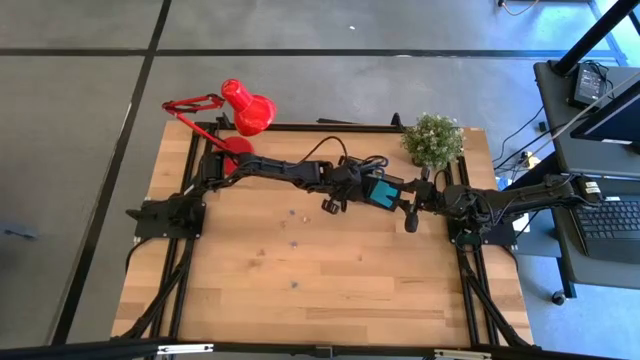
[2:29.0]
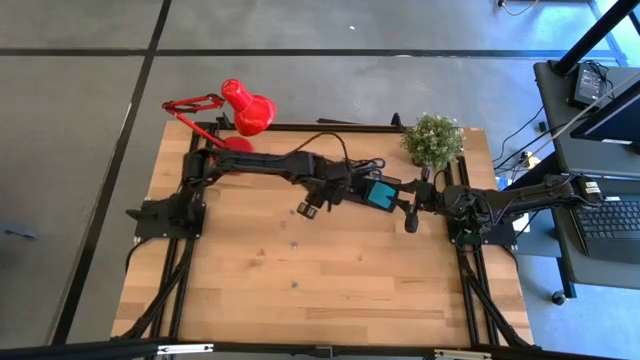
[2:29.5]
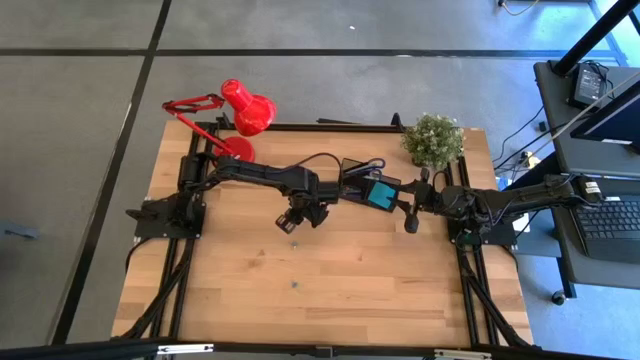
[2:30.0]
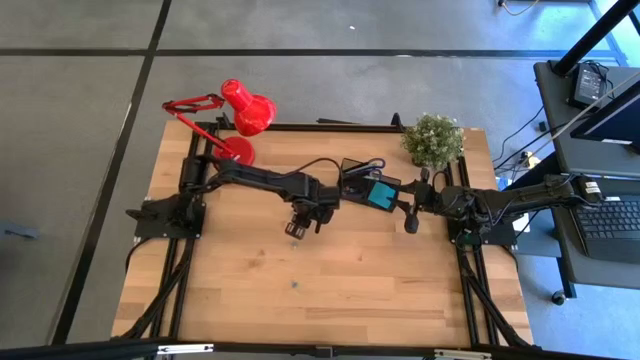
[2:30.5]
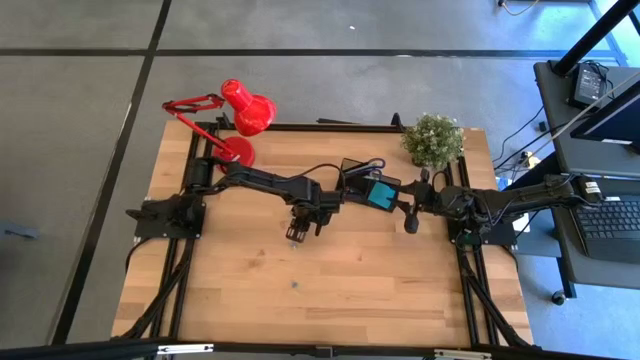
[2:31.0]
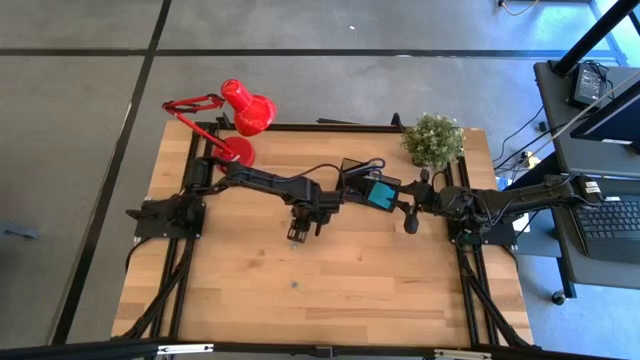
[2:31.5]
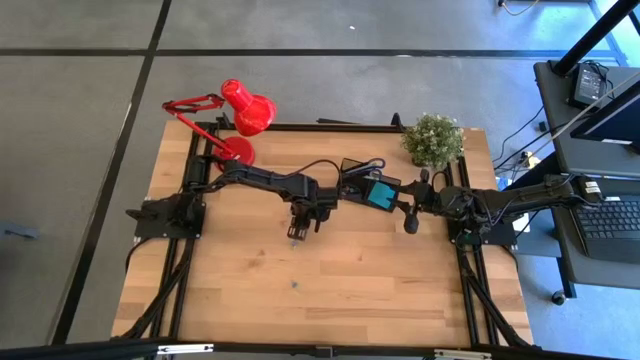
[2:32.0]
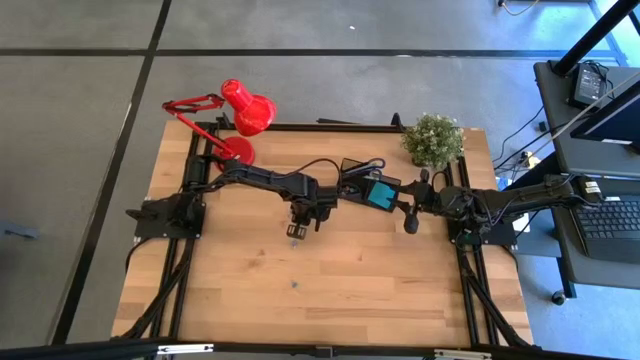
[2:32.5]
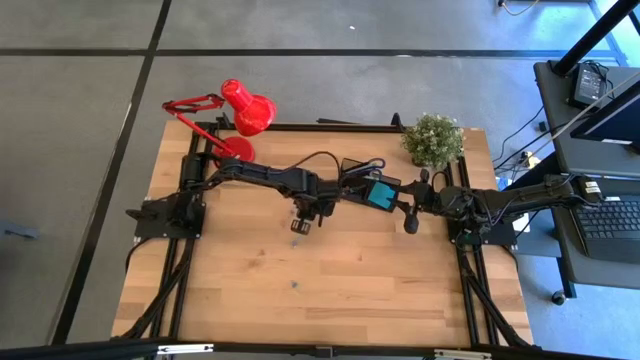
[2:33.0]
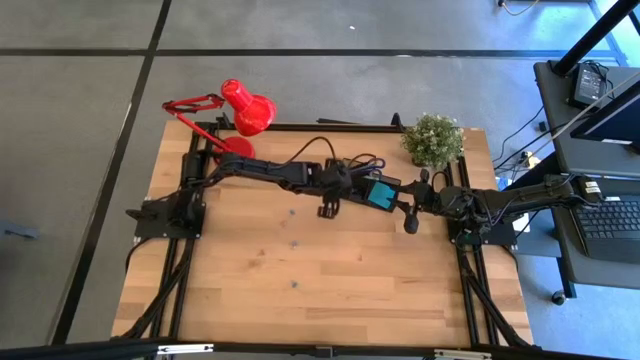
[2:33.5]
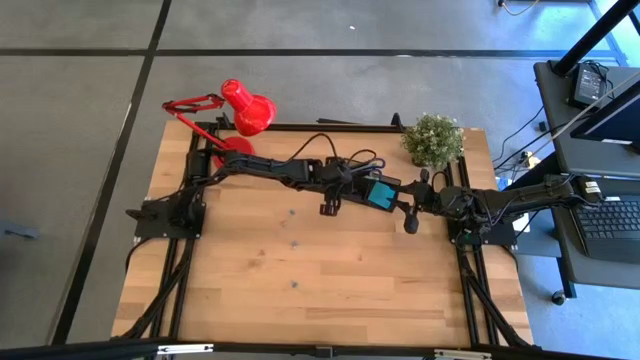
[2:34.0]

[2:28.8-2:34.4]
Task: Pick and place office supplies into organizer
Put the yellow binder clip into the black desk organizer

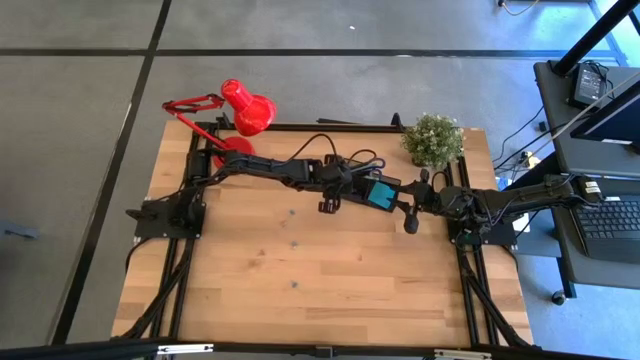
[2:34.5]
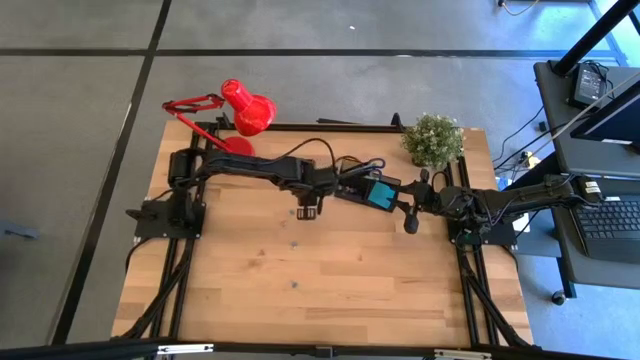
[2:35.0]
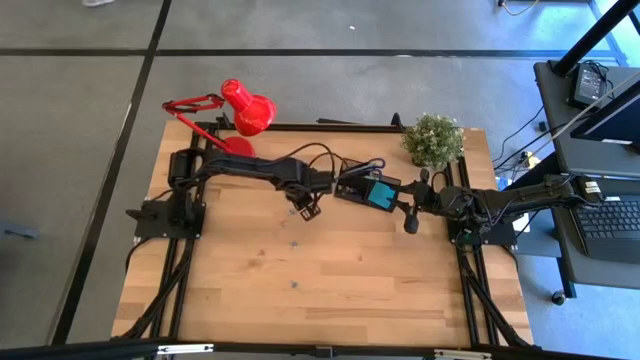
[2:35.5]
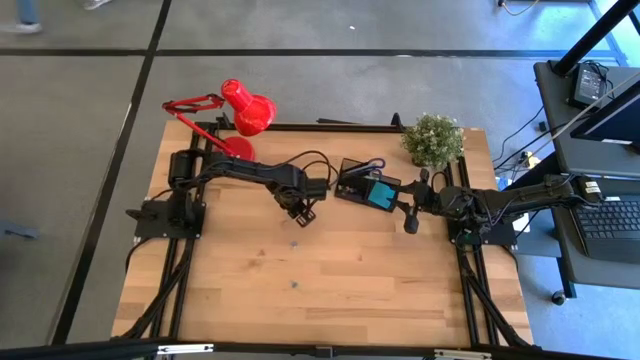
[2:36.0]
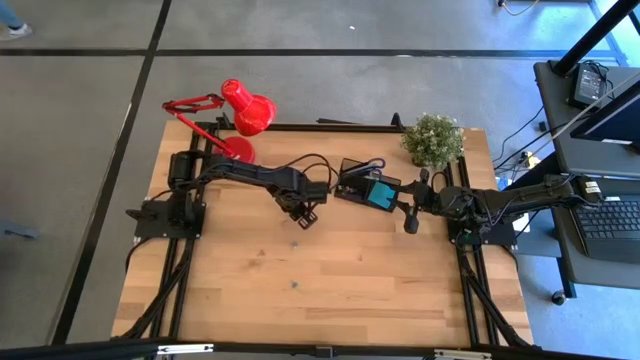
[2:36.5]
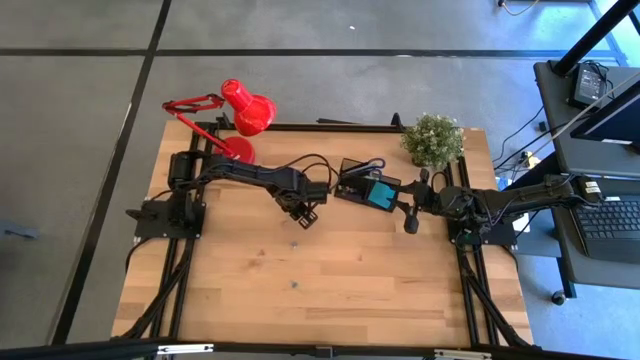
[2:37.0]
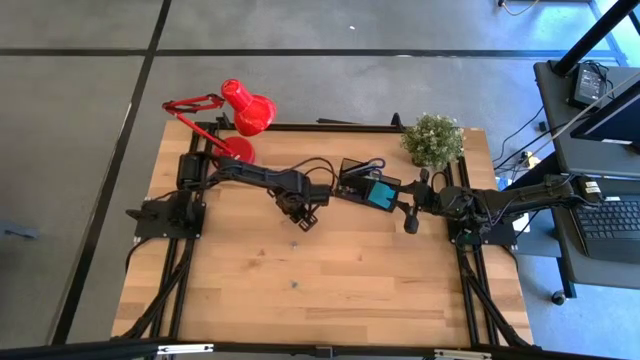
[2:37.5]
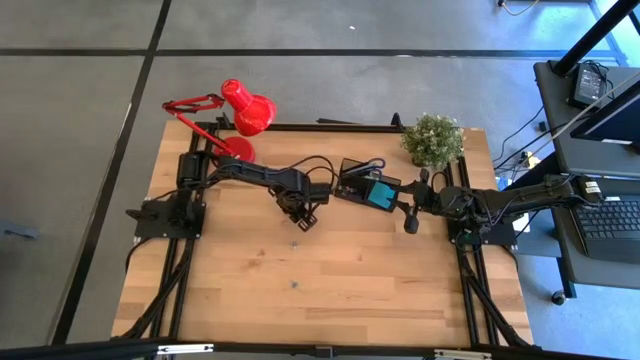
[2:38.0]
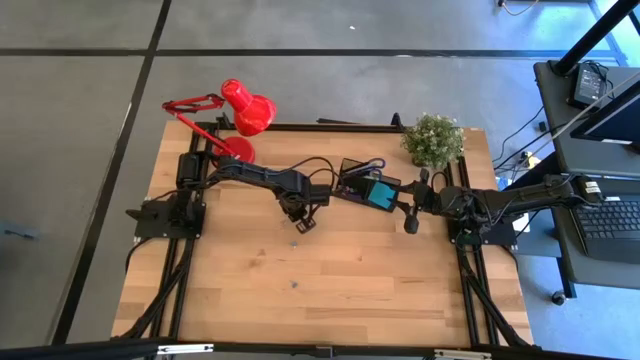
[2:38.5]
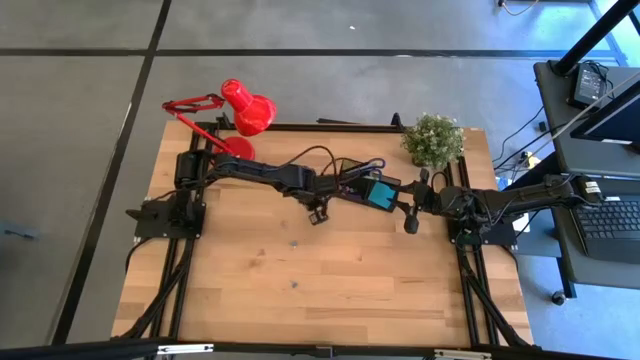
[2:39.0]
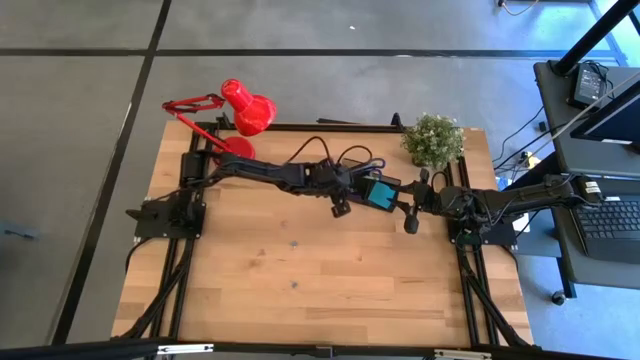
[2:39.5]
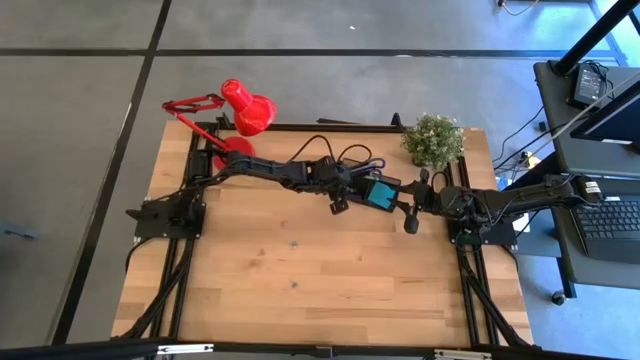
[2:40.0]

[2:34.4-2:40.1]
Put the blue binder clip into the black desk organizer

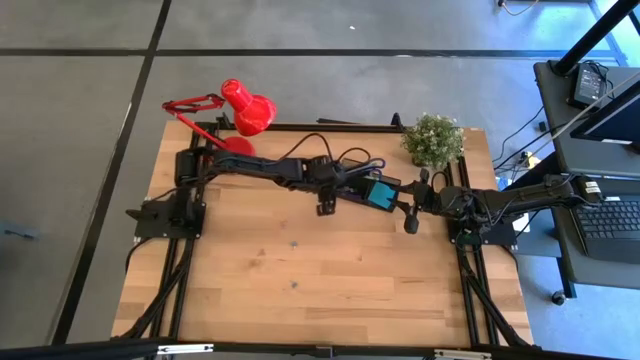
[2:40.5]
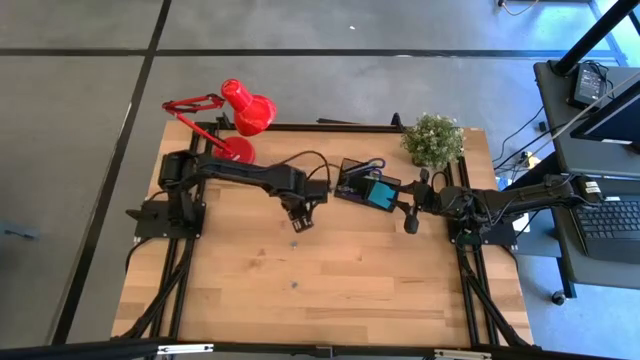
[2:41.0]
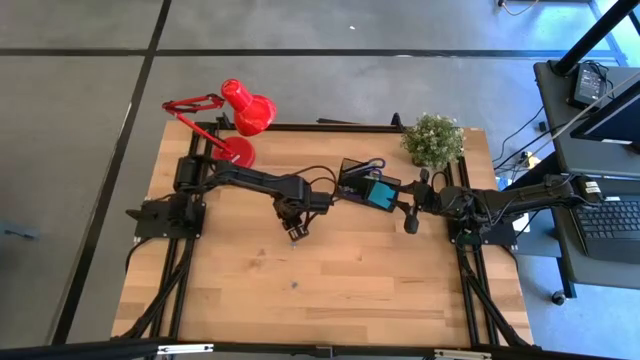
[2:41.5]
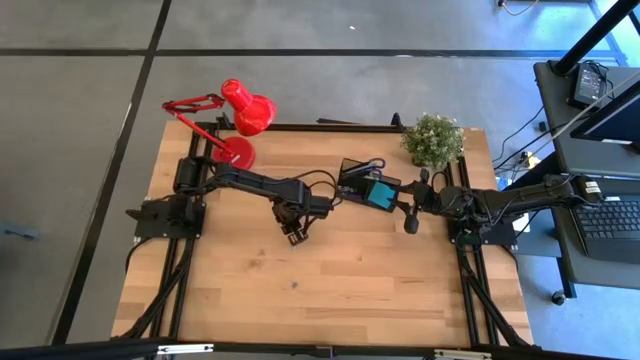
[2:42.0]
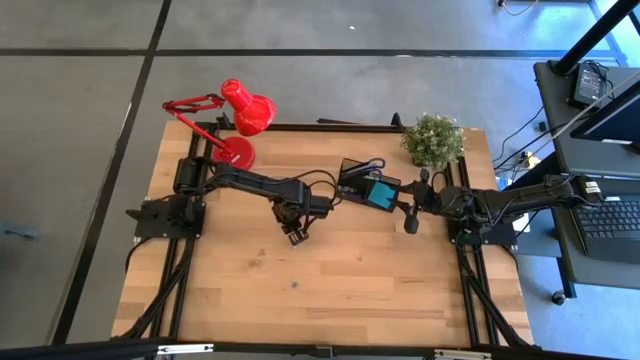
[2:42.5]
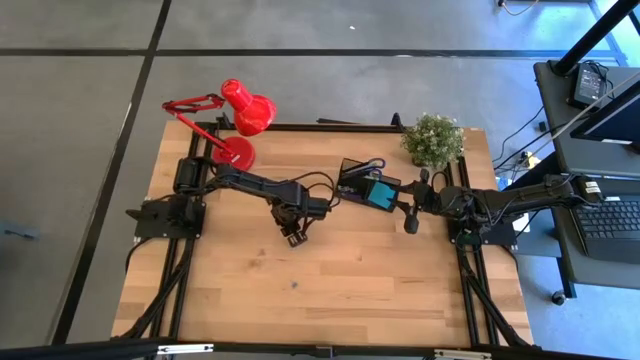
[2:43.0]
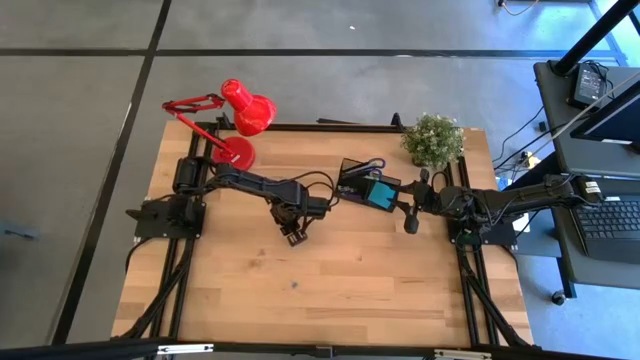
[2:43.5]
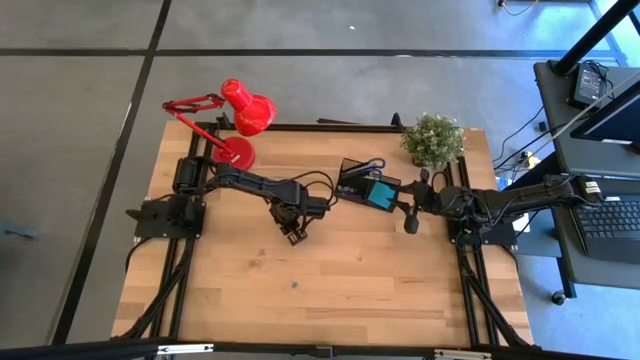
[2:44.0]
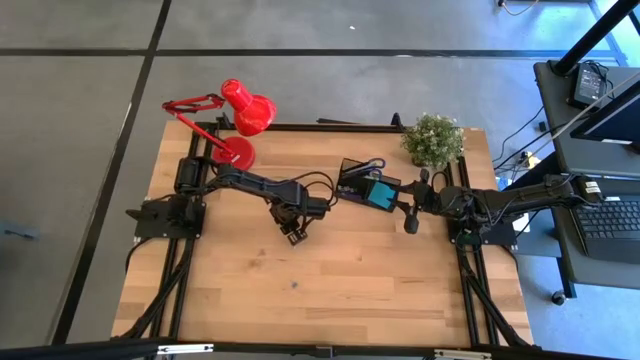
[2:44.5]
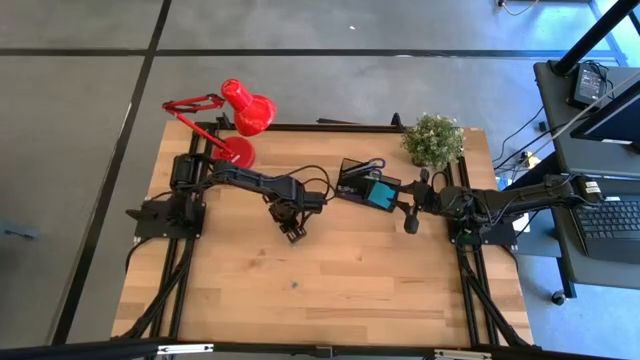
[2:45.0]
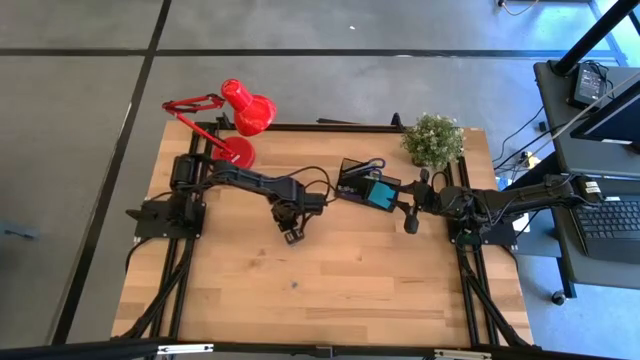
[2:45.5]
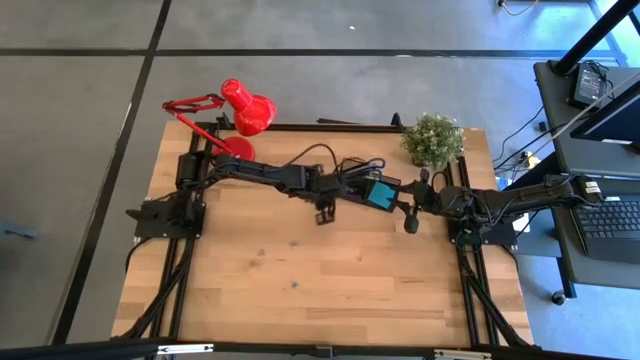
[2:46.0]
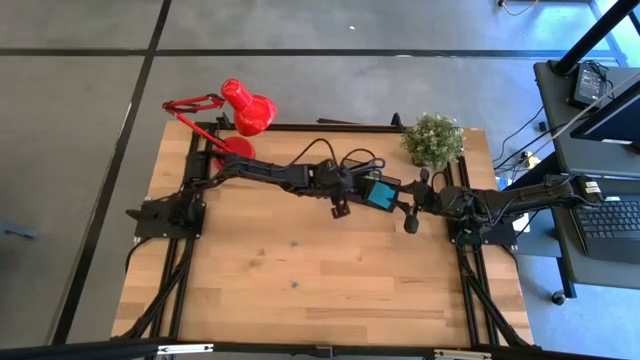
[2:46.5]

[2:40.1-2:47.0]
Put the pink binder clip into the black desk organizer

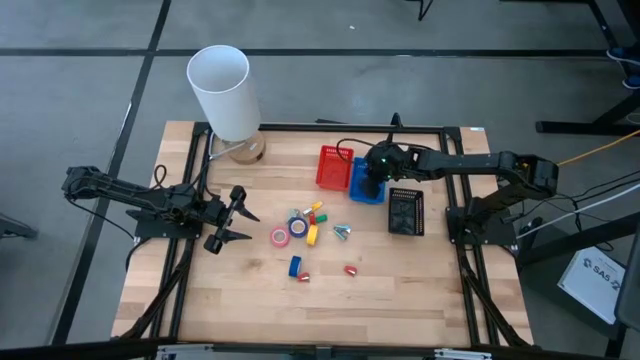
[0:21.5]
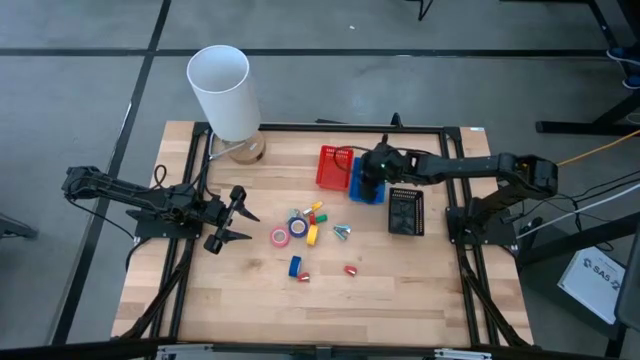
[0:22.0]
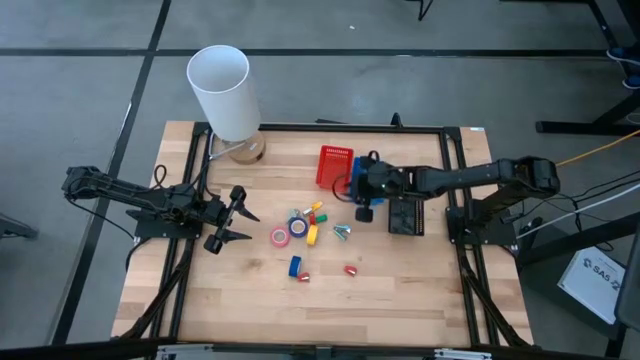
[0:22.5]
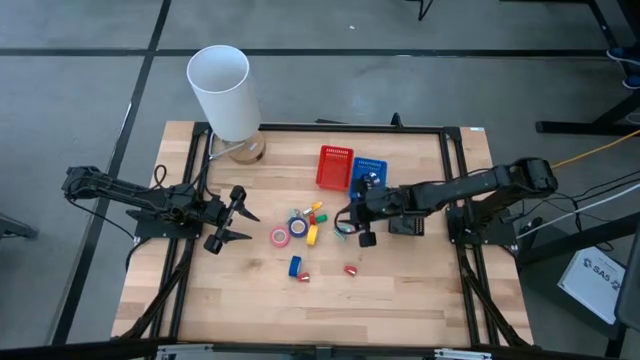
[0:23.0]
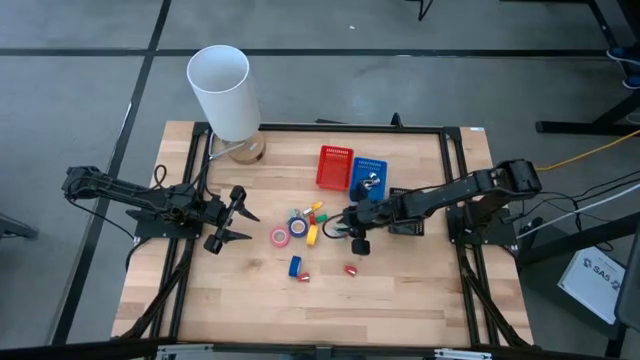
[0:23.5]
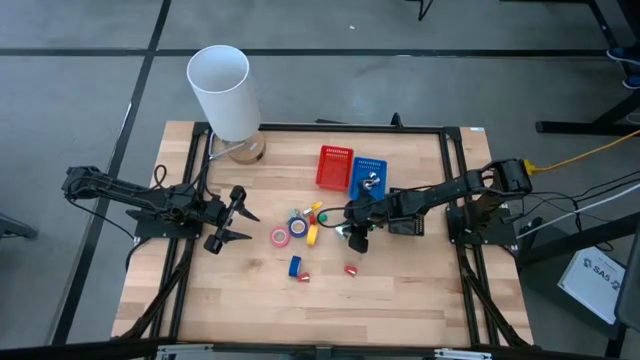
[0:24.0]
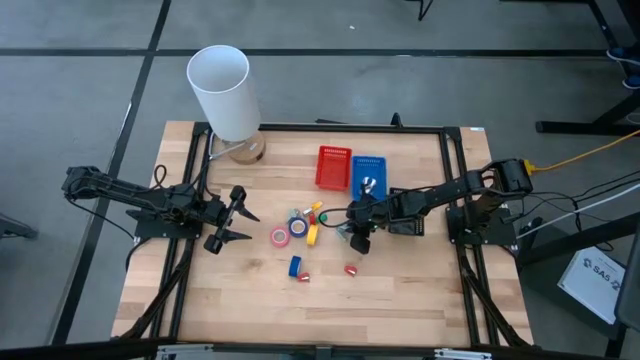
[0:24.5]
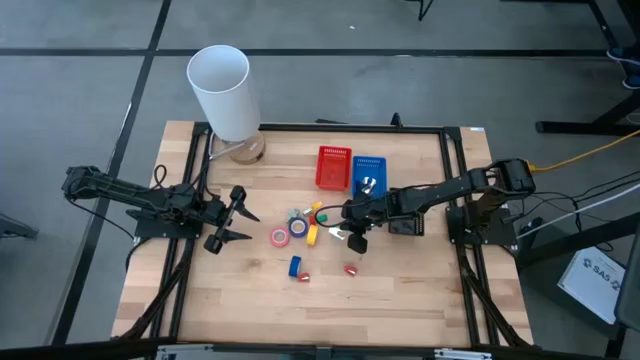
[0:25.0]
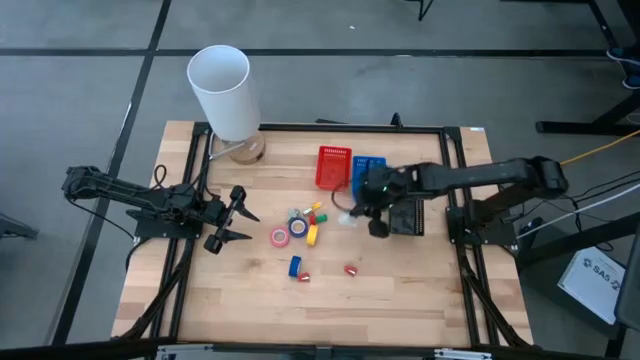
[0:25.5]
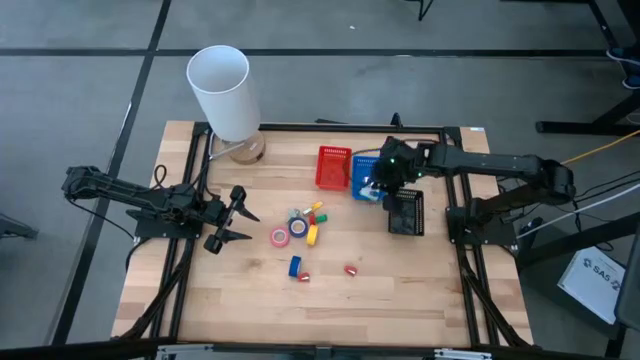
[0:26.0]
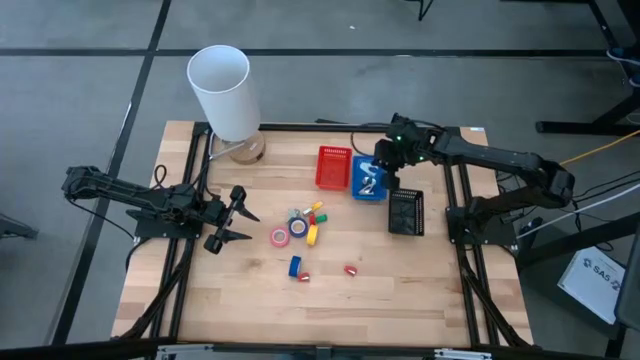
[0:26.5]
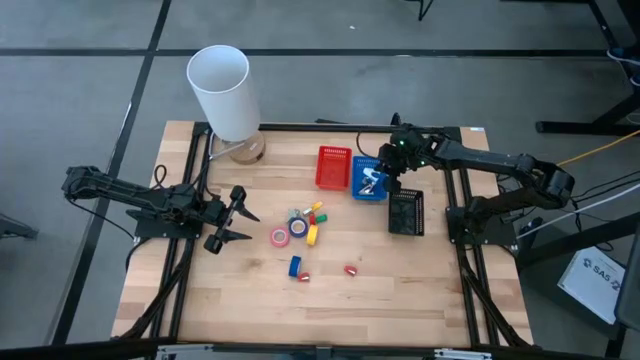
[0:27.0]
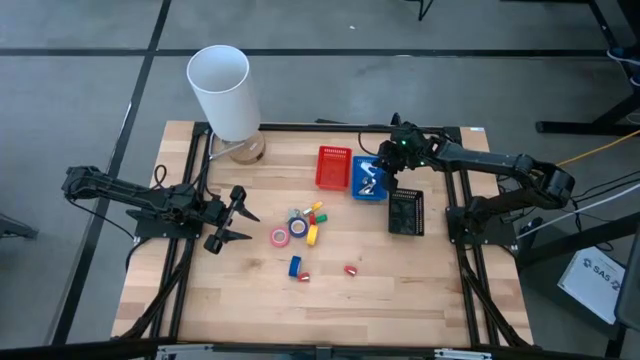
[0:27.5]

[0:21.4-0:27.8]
Task: Pick and place Stapler, Stapler remover, tape
Put the light blue staple remover into the blue bin
